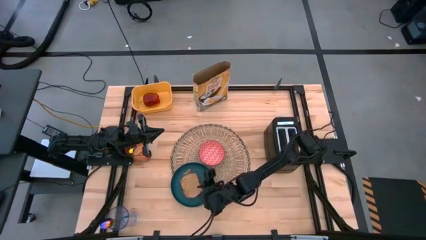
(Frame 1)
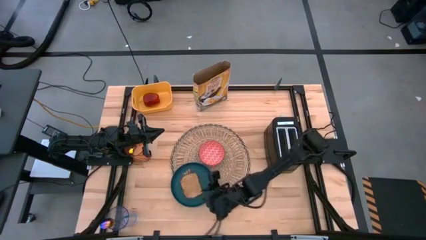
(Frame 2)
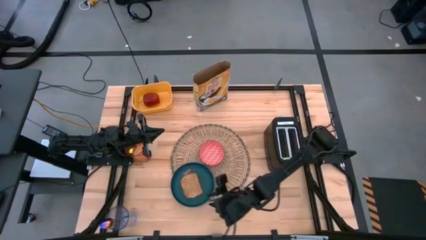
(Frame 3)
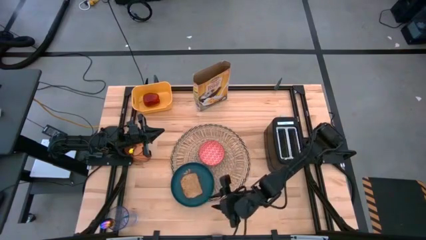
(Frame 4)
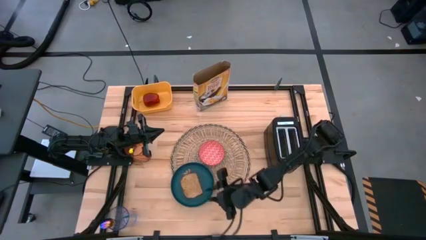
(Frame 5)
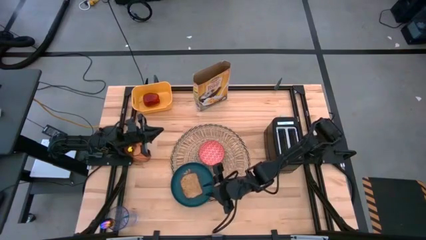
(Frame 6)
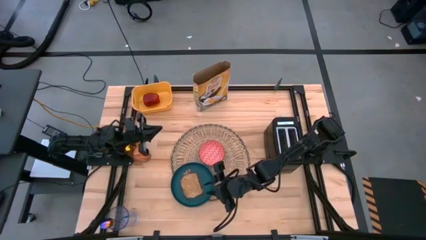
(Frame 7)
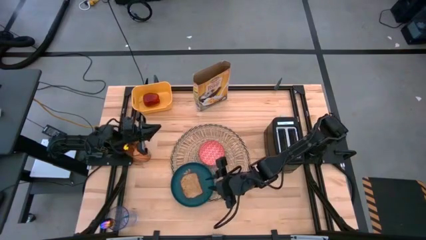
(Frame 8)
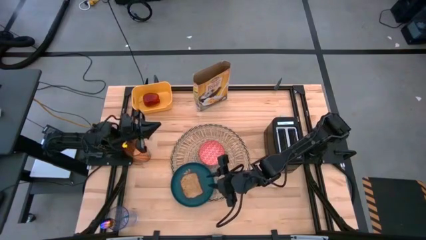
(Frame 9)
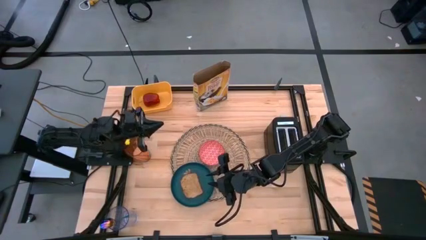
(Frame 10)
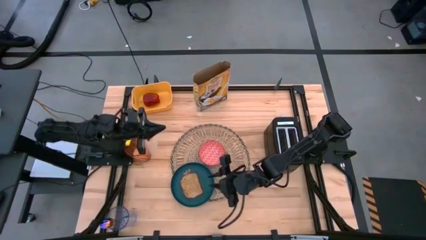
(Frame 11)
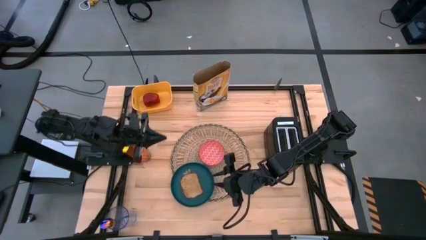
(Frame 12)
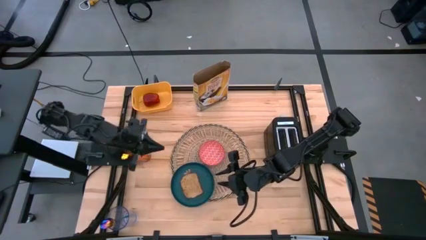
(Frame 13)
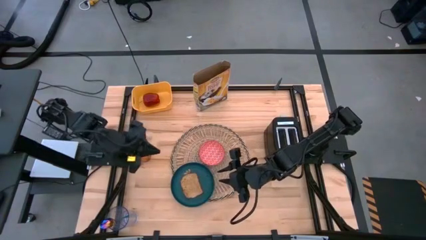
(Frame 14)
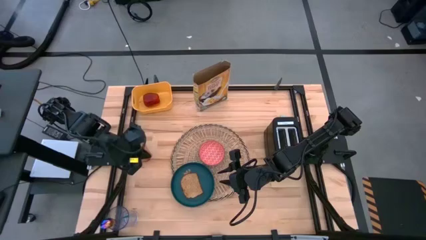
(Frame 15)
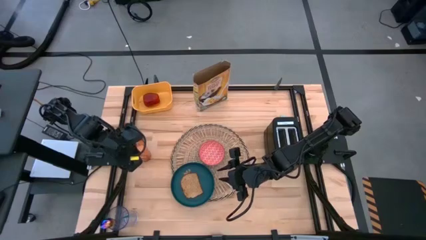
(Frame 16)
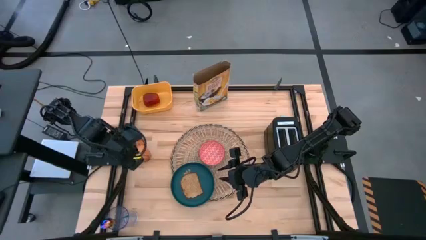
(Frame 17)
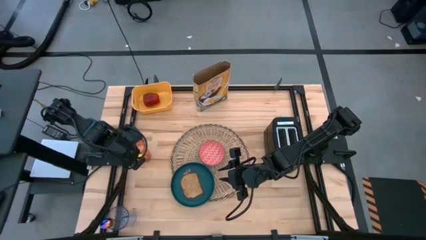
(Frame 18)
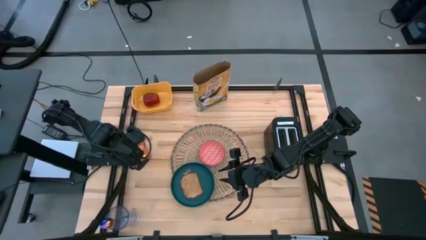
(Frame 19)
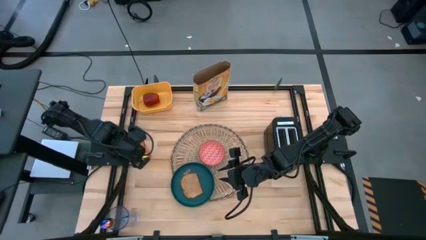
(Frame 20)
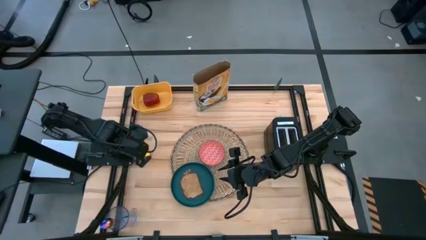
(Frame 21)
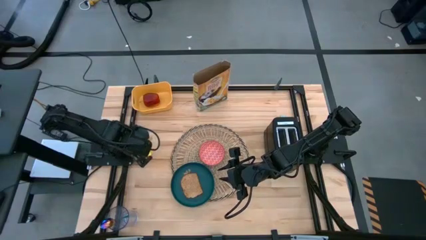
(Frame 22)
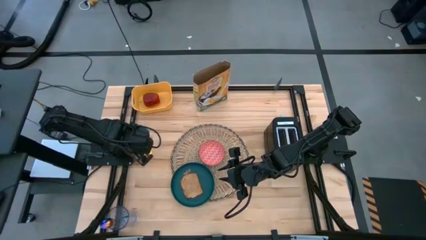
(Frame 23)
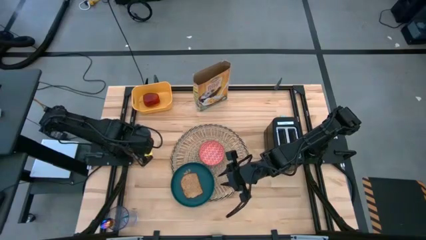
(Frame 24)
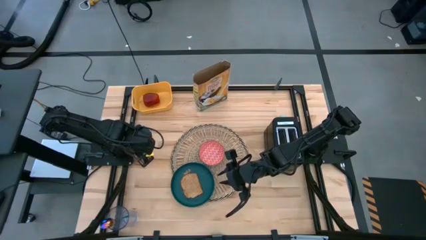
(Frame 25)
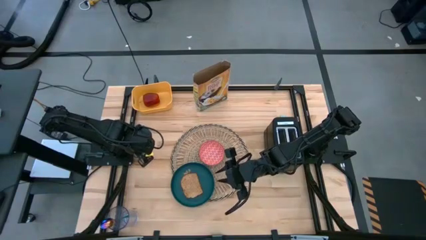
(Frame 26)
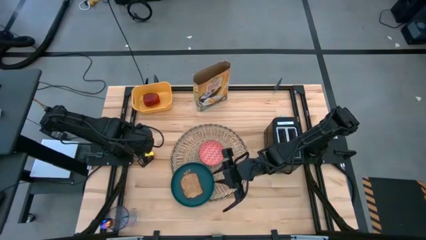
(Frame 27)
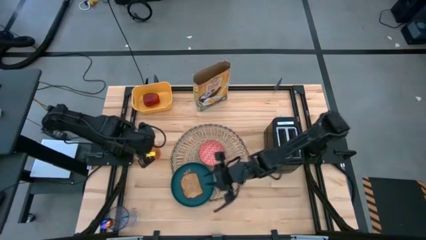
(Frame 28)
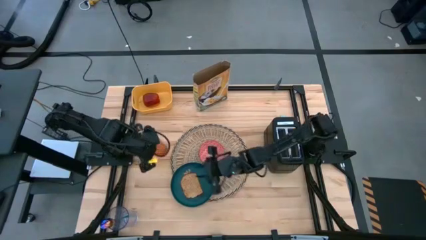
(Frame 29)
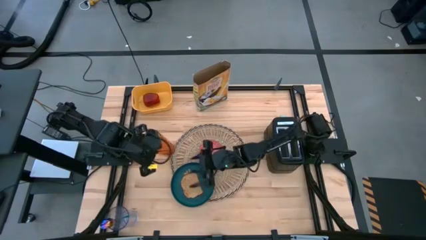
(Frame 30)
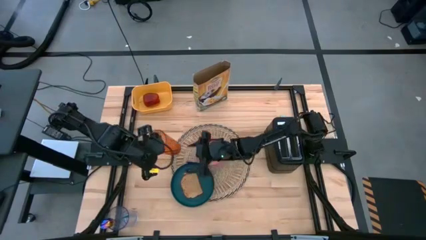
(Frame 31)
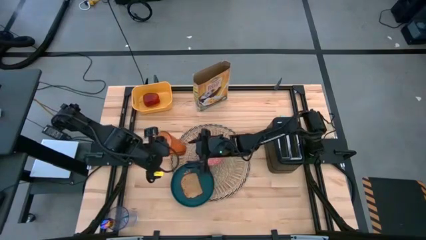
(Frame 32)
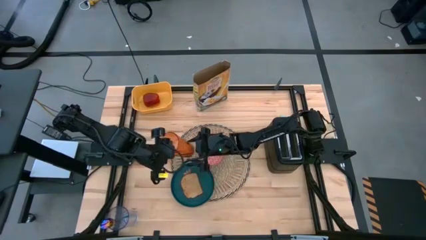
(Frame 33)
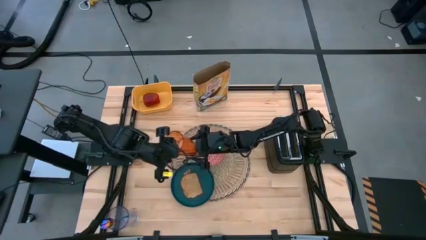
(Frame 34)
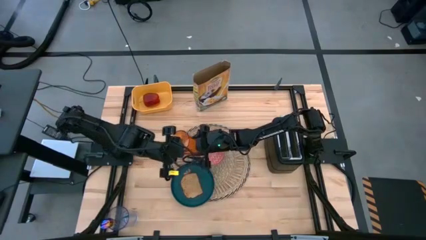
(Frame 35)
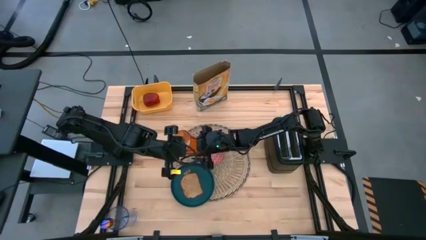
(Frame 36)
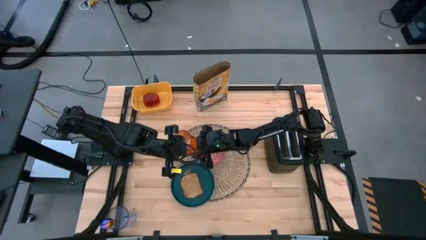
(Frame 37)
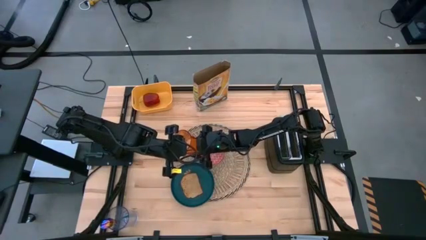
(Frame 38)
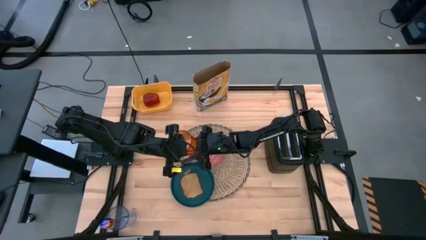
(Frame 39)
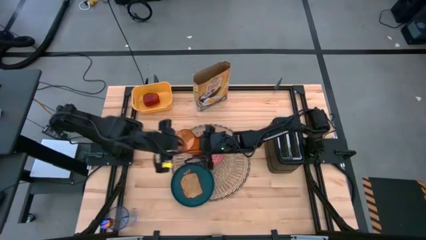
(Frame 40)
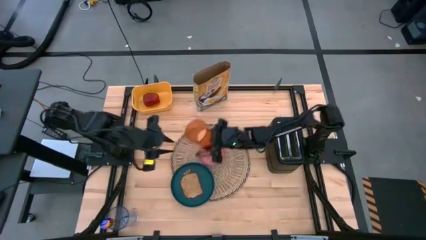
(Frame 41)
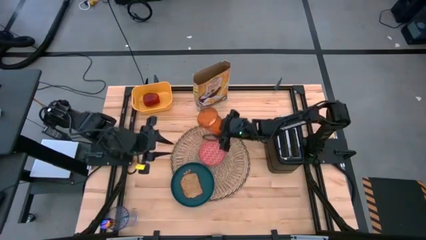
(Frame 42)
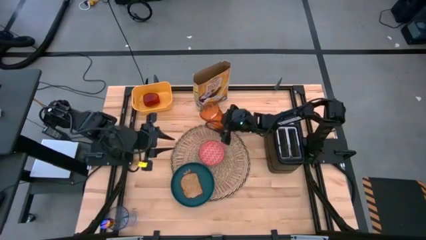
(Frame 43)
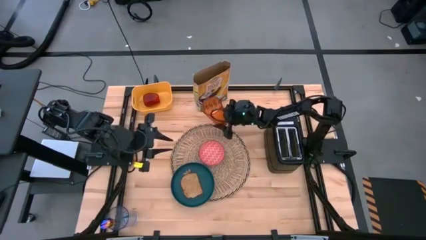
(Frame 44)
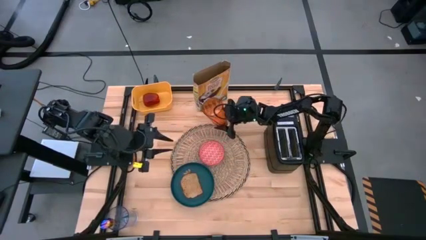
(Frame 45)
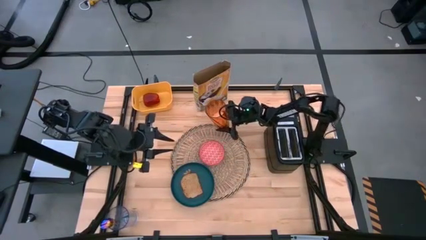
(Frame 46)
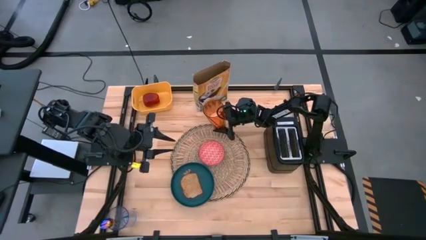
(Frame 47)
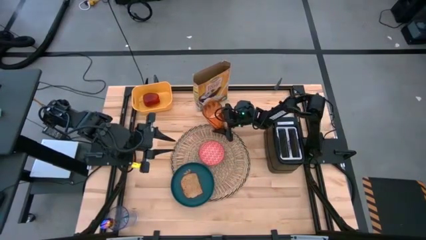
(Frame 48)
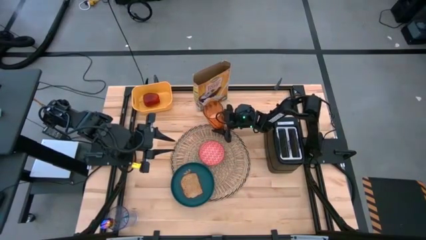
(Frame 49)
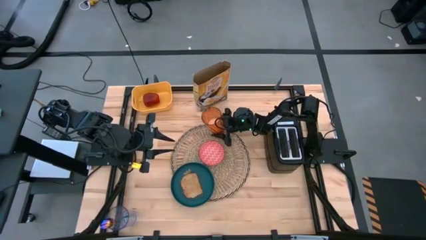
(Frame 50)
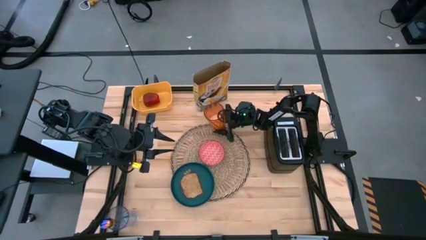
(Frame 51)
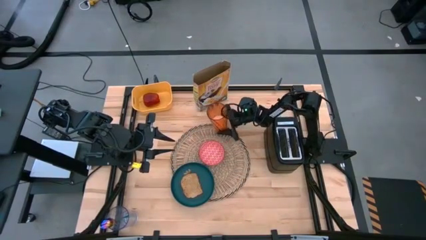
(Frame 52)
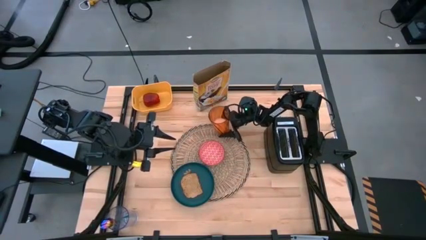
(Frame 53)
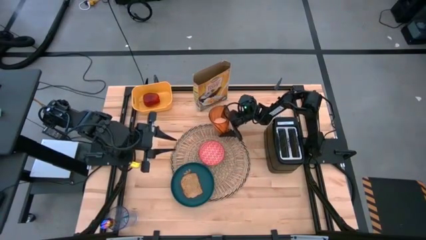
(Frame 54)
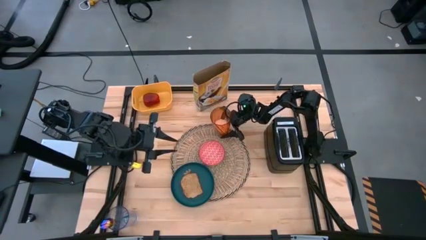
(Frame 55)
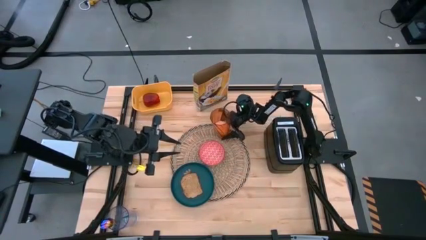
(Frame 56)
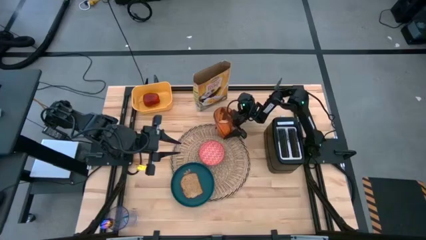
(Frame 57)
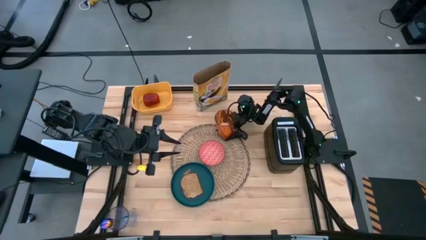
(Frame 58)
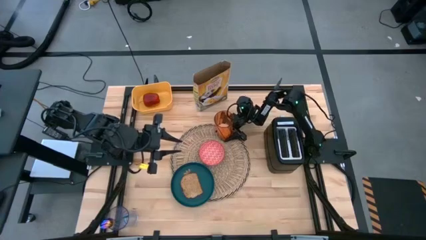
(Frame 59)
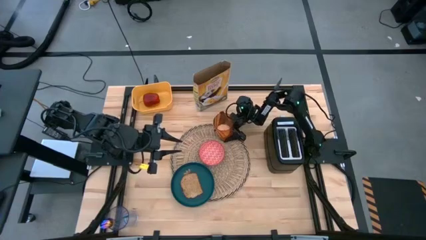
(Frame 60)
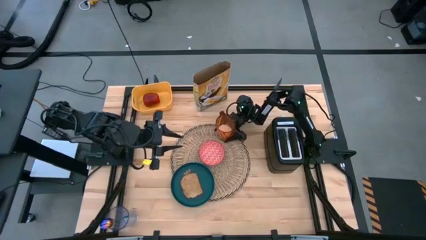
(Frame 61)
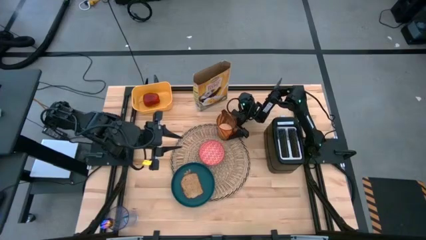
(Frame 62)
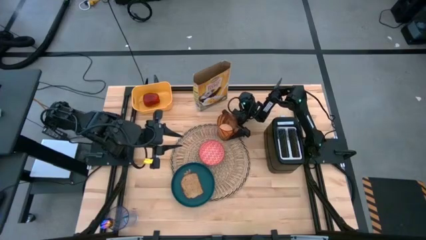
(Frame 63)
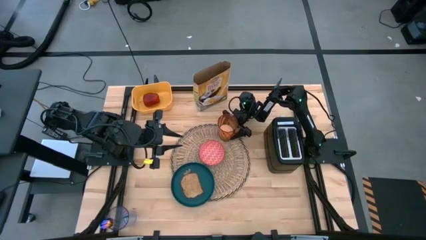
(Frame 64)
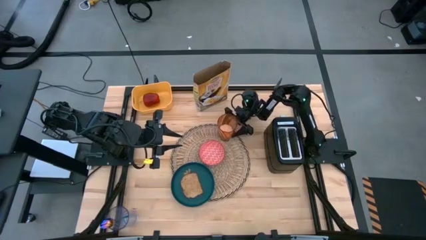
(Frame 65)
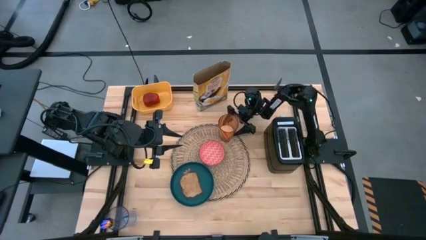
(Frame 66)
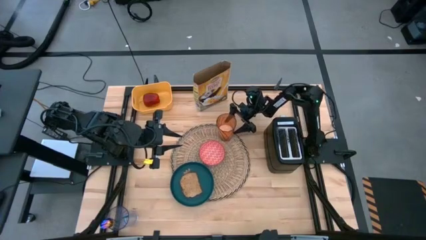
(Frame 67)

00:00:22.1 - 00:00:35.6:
Task: Arrange a breakfast setting
Put the orange cup of milk on the placemat to the top right of the red bowl
